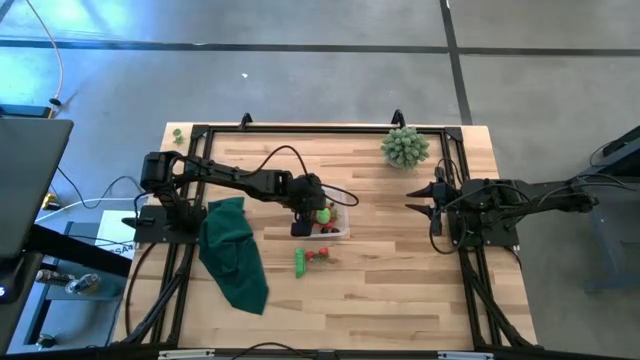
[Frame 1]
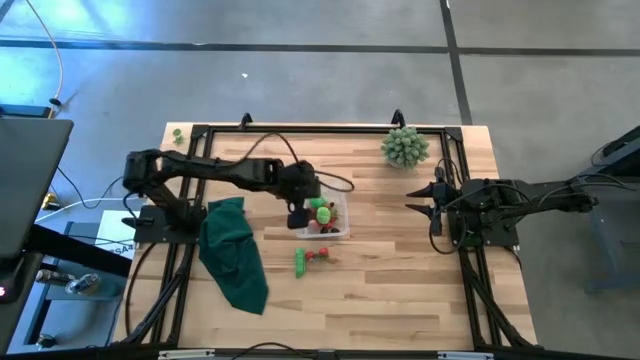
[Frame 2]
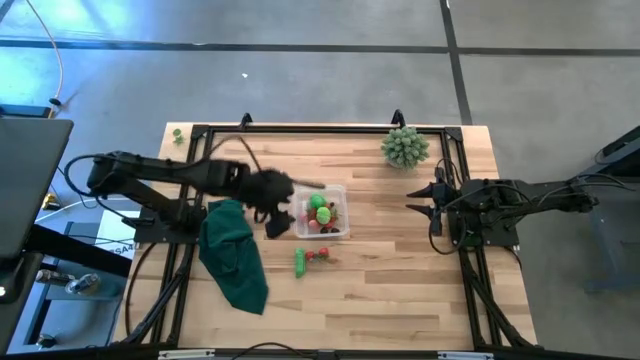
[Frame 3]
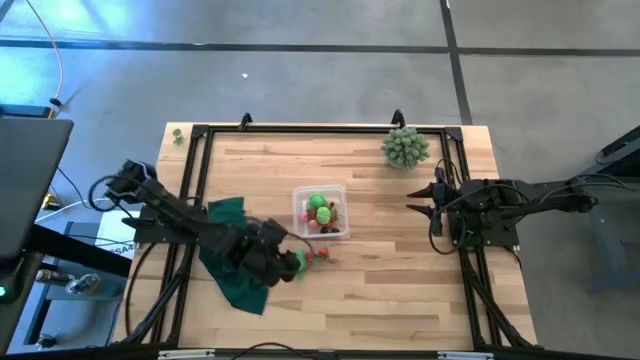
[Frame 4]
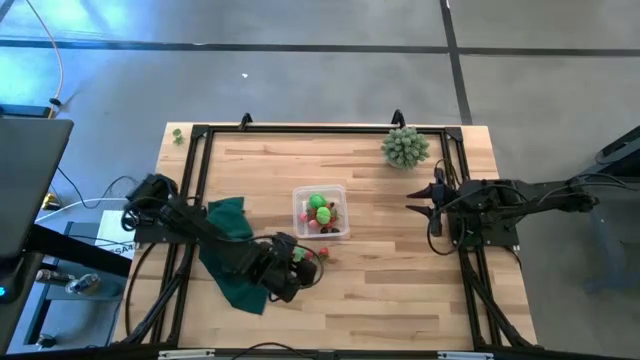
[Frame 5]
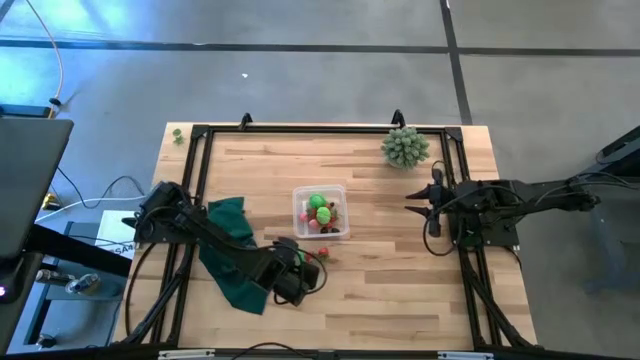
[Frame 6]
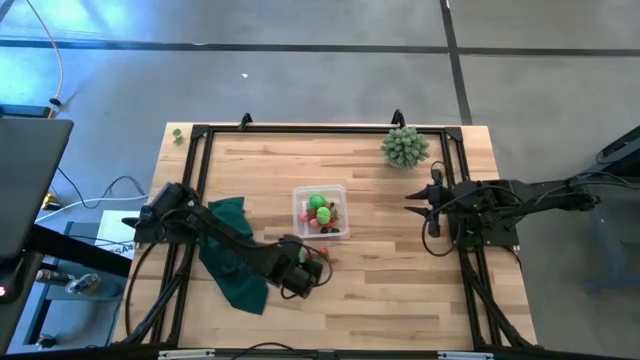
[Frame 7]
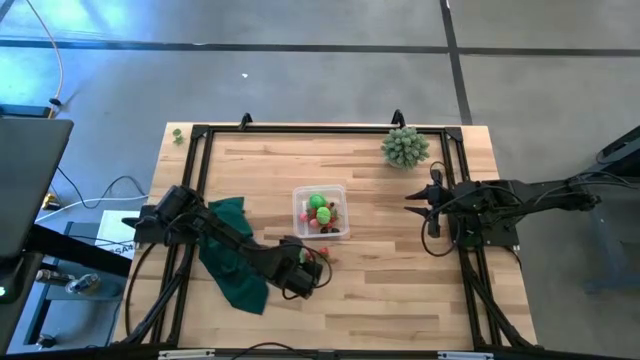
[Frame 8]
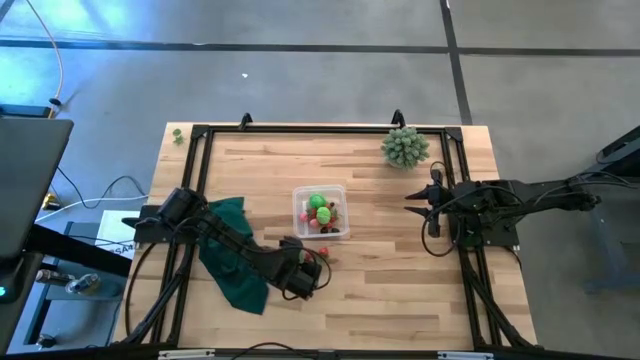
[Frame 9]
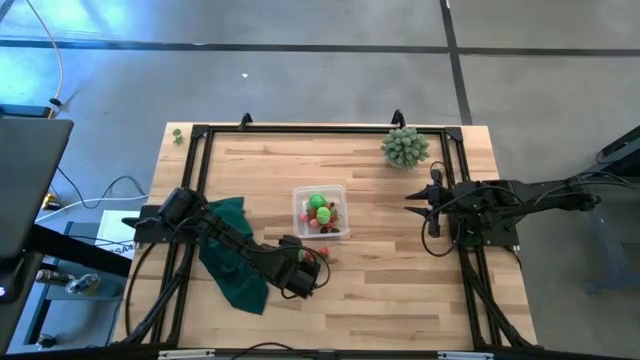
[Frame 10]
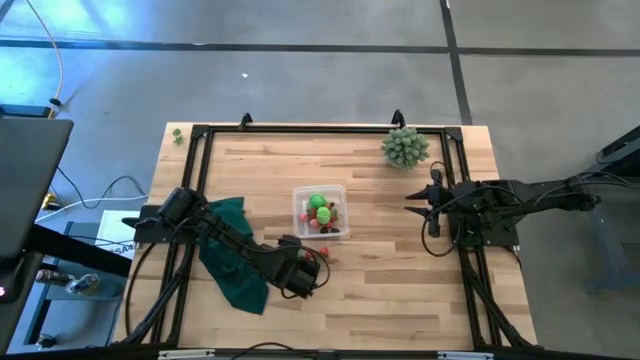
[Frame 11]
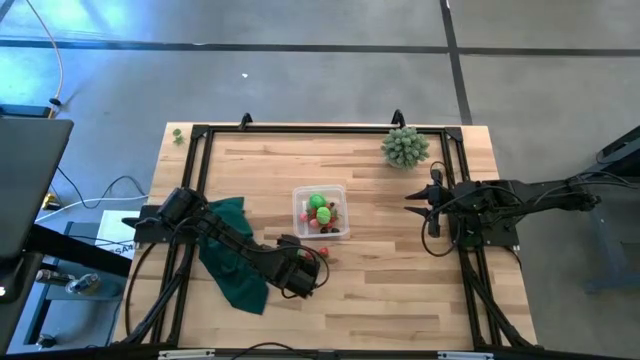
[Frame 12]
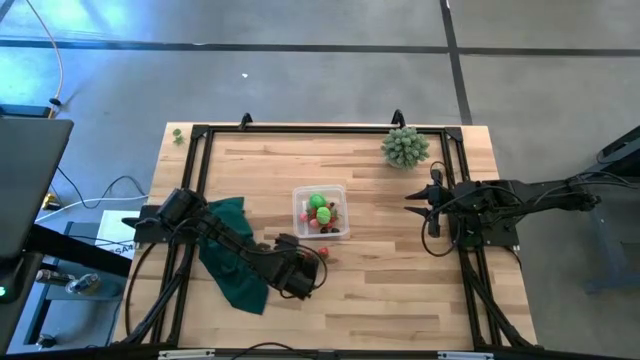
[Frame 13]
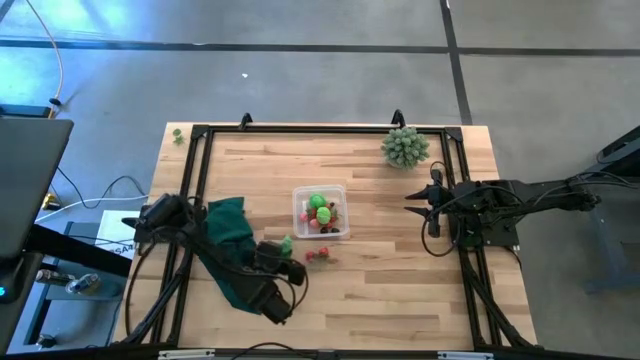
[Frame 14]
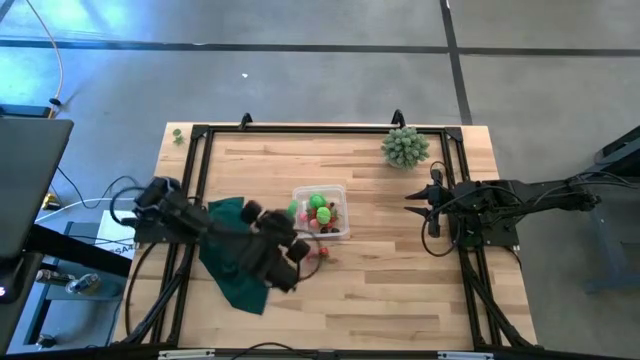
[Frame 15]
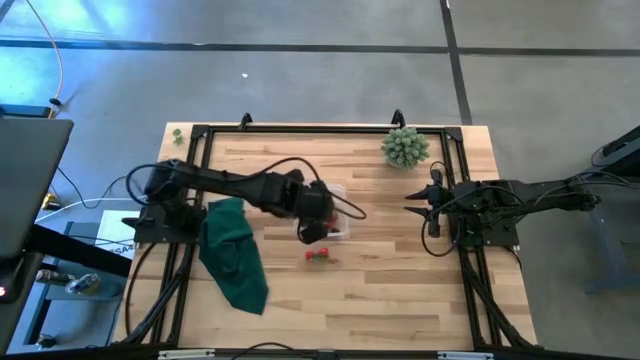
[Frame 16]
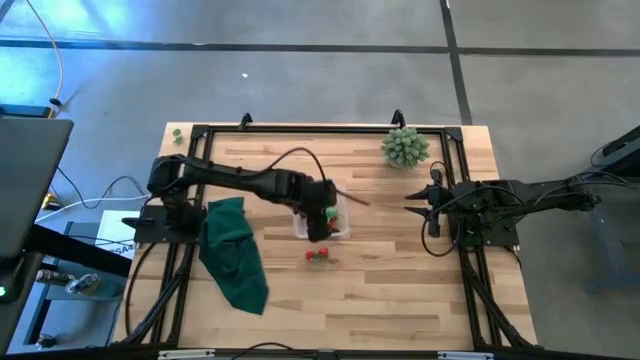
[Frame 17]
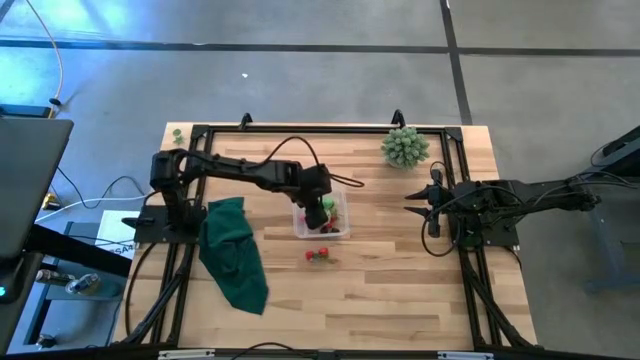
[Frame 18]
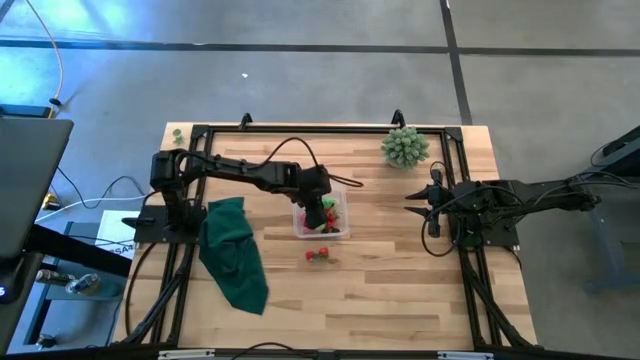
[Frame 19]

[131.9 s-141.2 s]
Task: Pick and placing Produce into tupperware
Put the green peas into the transparent bin

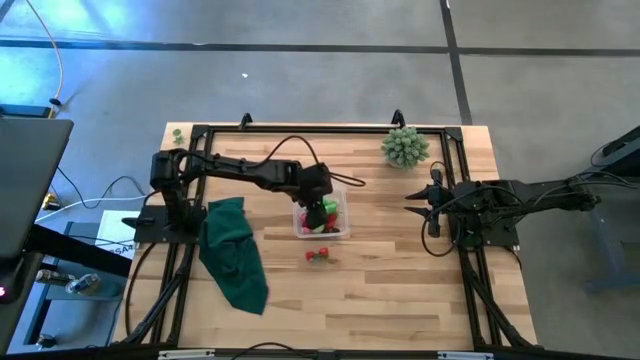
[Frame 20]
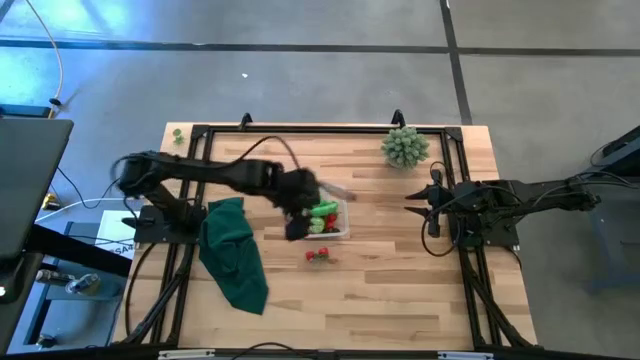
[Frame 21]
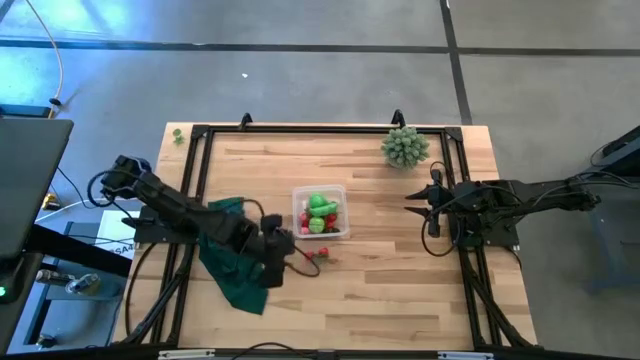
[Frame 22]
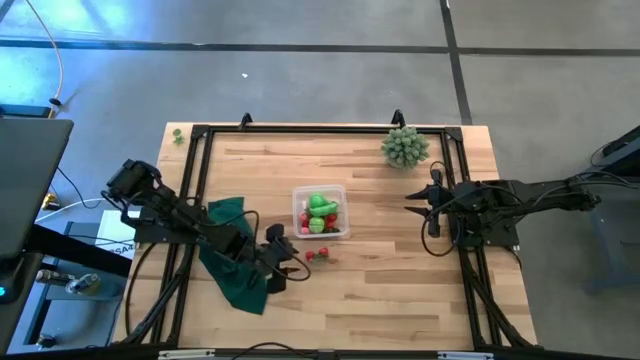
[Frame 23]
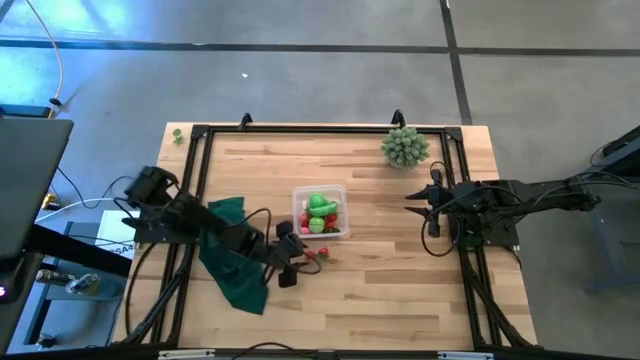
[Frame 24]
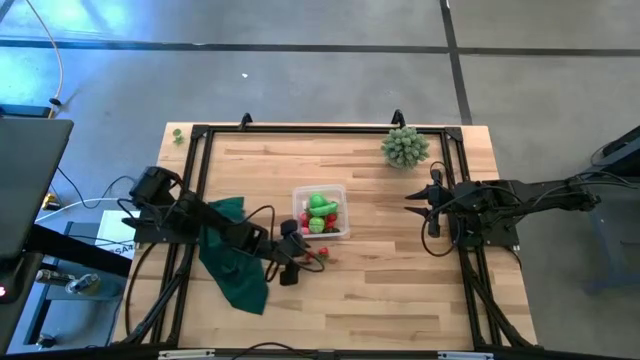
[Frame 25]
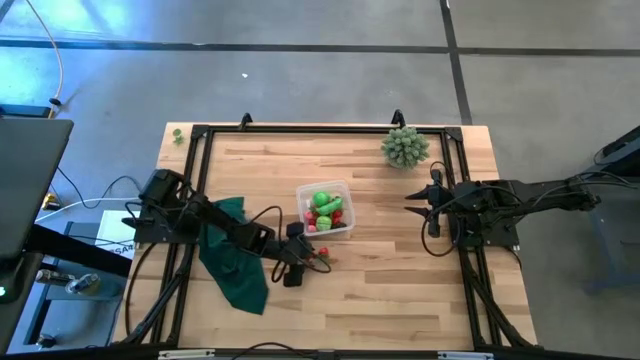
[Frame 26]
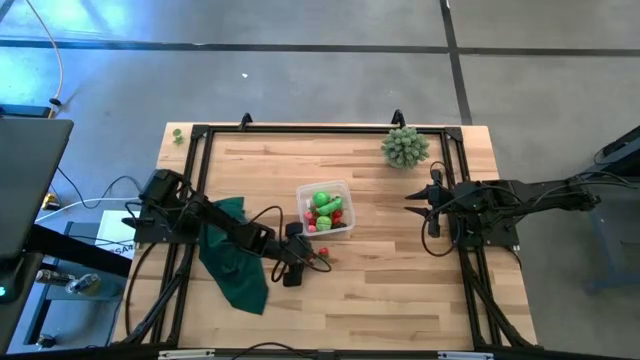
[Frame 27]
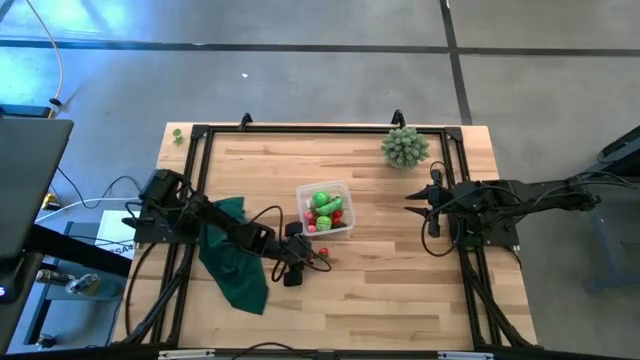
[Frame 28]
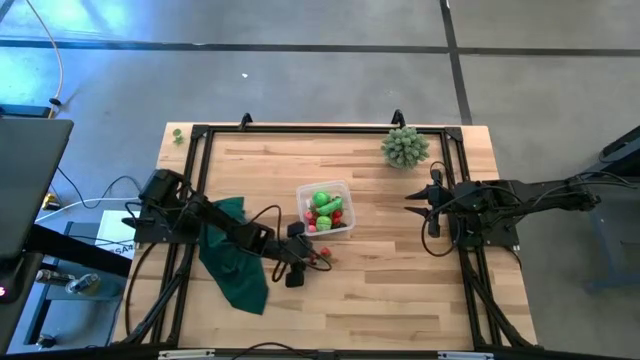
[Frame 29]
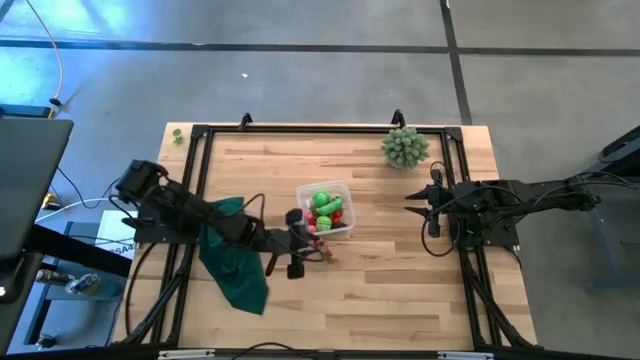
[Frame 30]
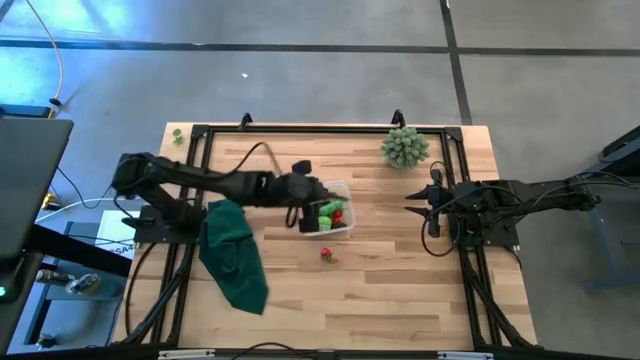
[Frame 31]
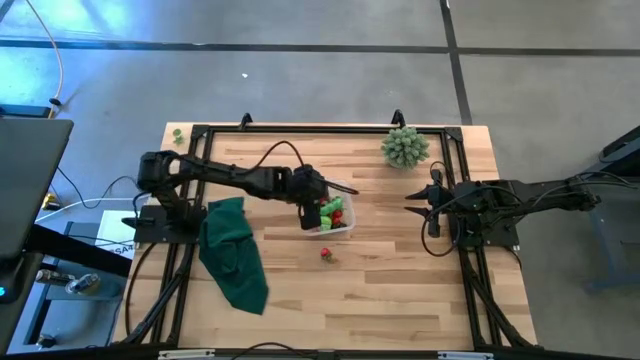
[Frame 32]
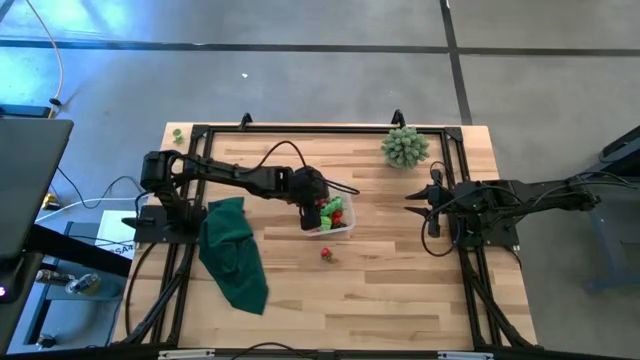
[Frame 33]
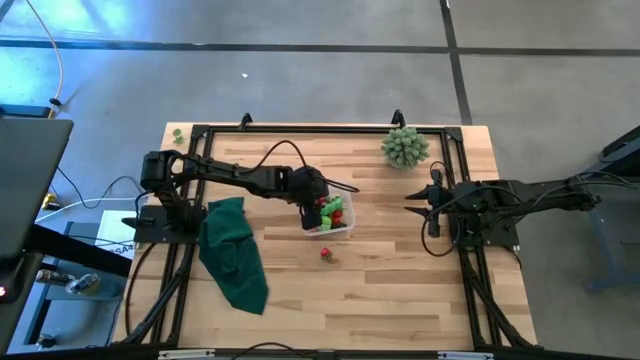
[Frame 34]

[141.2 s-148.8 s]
Put the strawberry into the transparent bin

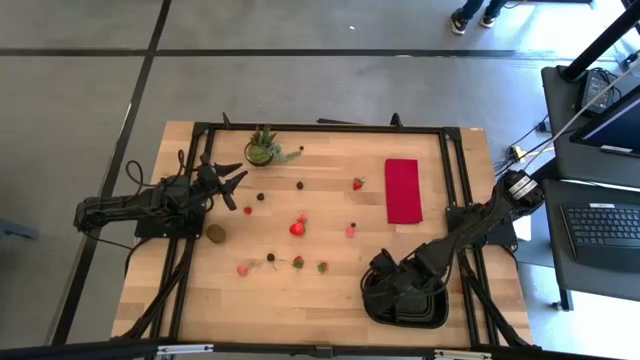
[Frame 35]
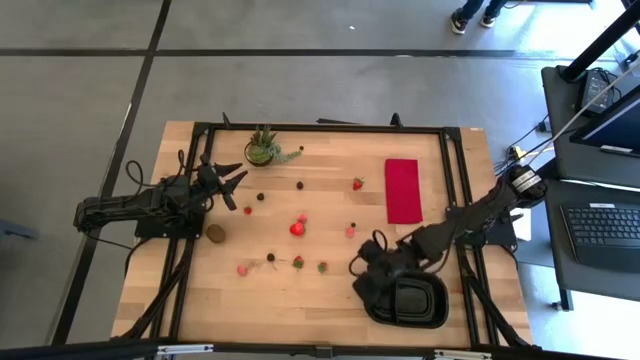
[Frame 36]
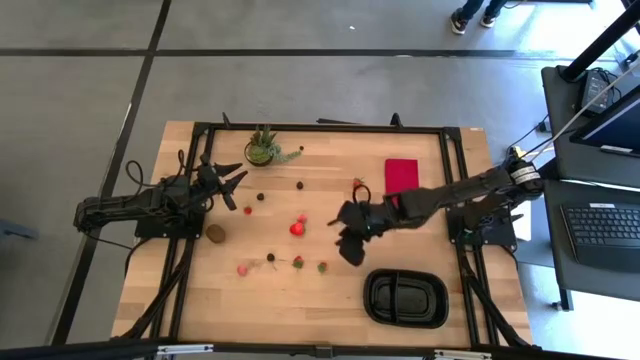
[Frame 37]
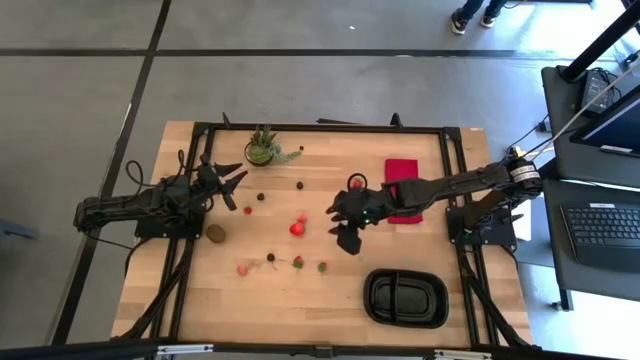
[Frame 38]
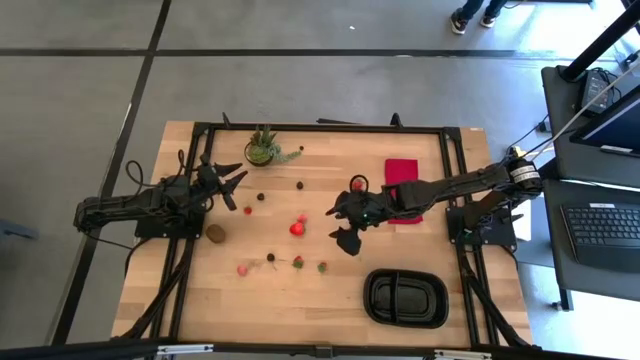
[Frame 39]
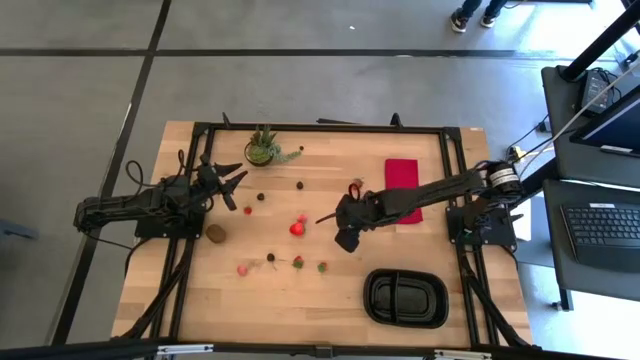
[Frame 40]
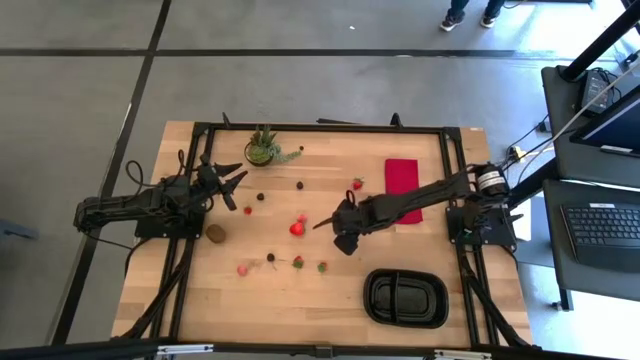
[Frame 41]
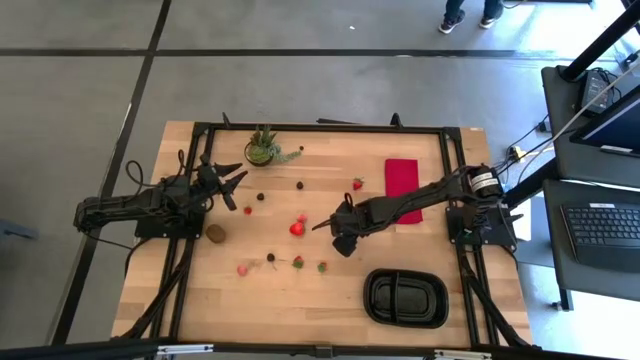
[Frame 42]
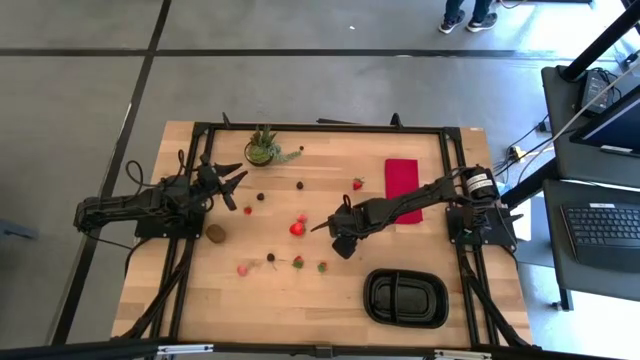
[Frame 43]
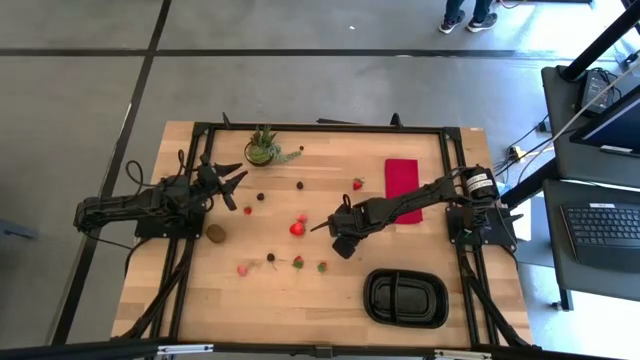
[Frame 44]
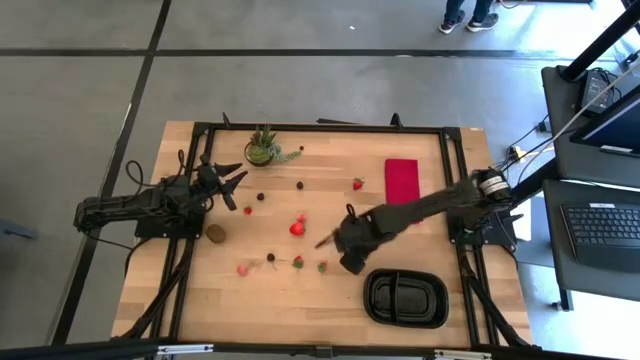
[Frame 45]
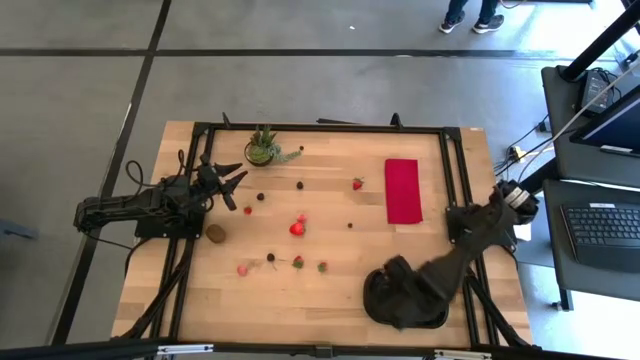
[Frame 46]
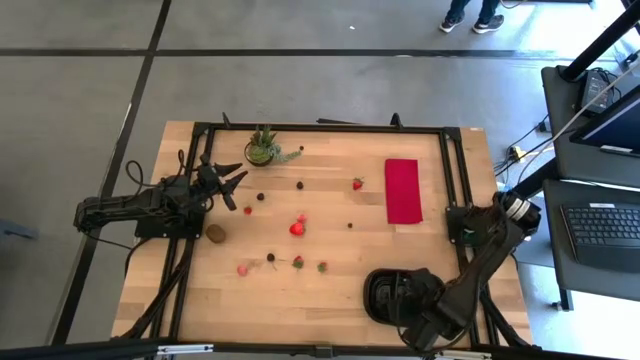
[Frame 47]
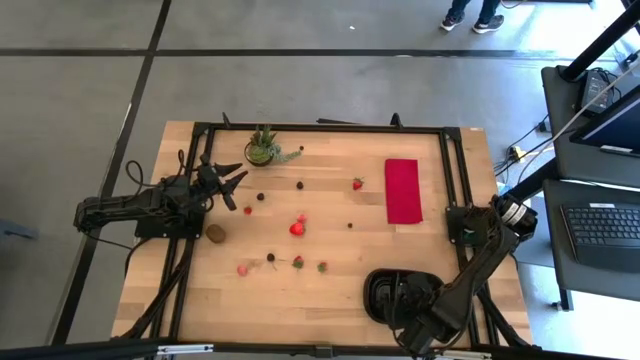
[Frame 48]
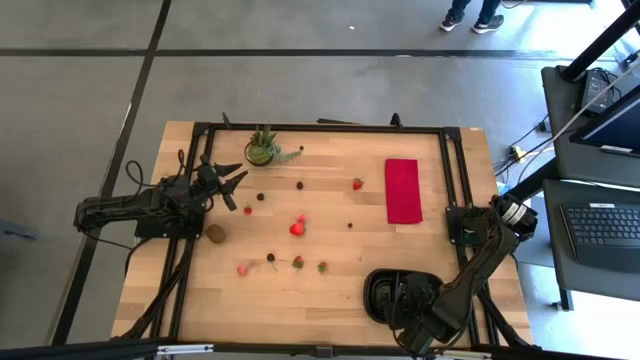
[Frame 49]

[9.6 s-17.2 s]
Task: Pick and placing Produce into tupperware
Put the peach into the right of the black bin
